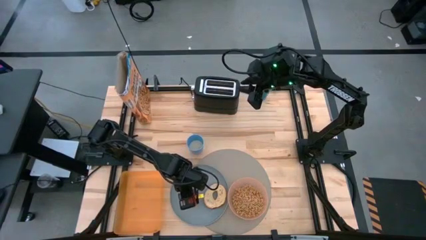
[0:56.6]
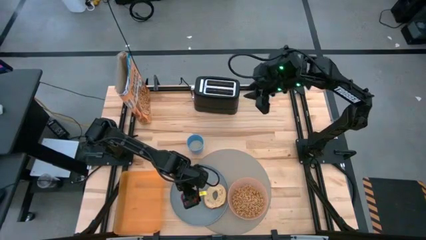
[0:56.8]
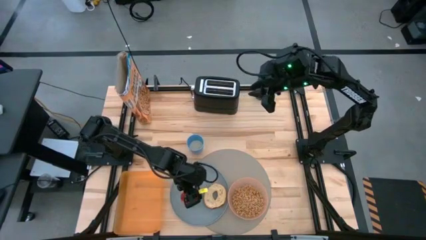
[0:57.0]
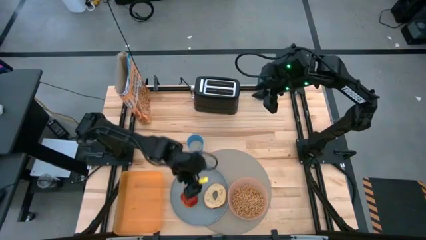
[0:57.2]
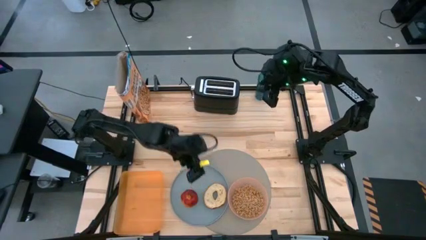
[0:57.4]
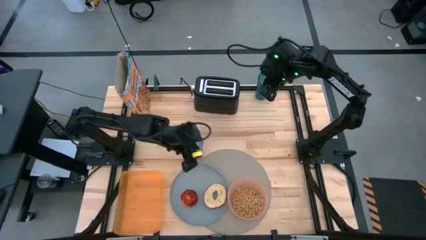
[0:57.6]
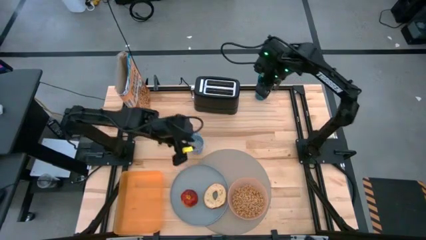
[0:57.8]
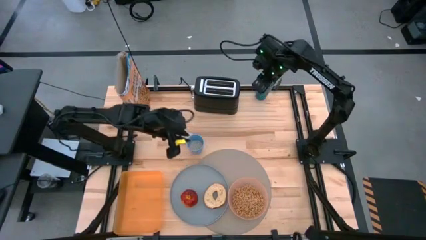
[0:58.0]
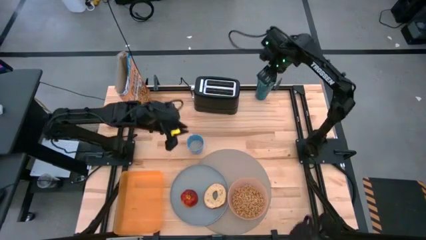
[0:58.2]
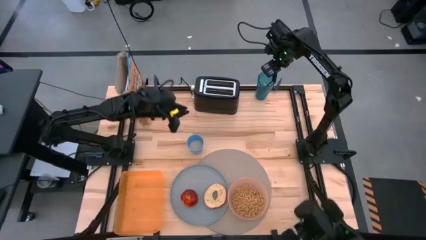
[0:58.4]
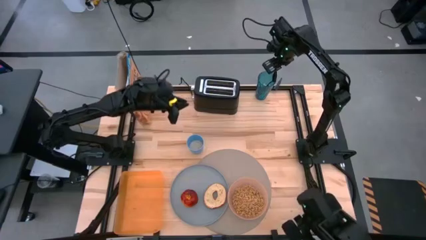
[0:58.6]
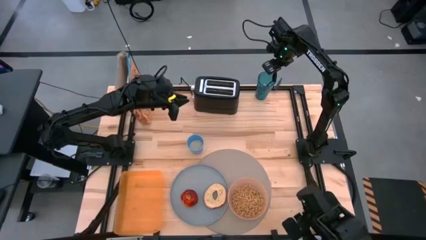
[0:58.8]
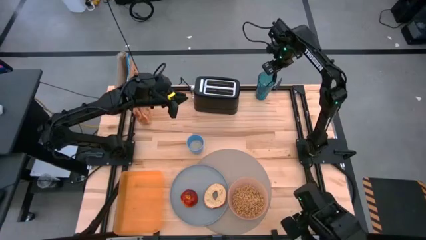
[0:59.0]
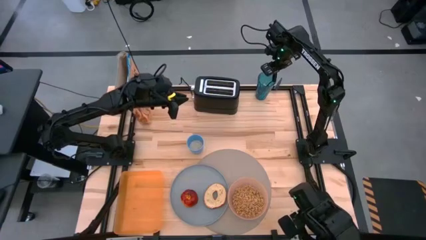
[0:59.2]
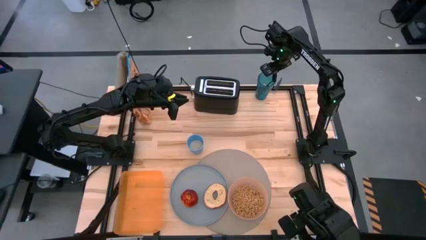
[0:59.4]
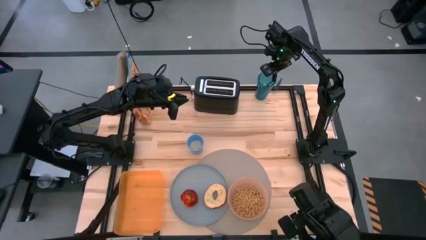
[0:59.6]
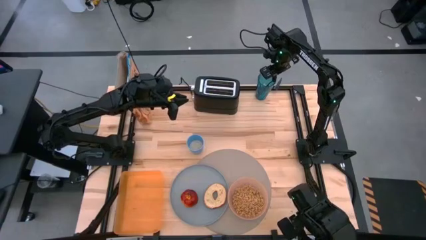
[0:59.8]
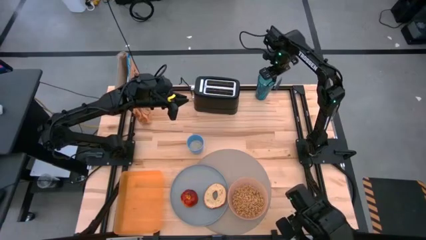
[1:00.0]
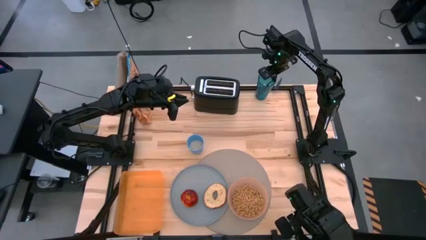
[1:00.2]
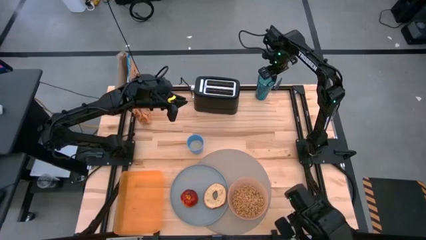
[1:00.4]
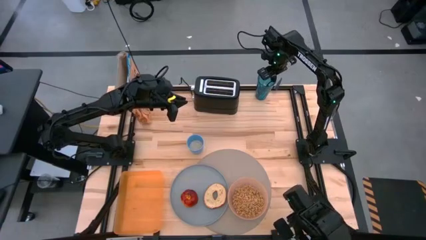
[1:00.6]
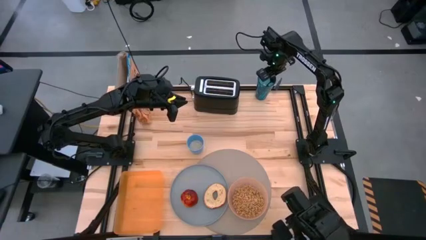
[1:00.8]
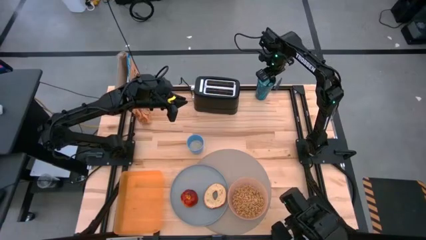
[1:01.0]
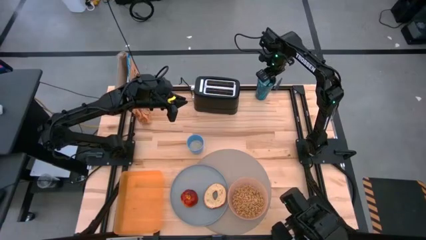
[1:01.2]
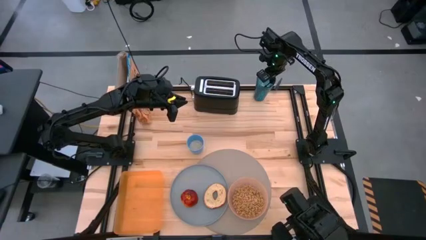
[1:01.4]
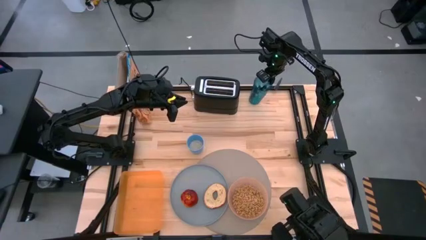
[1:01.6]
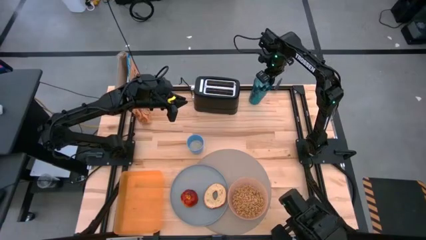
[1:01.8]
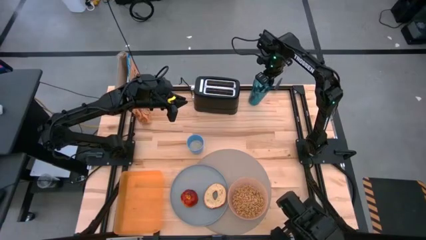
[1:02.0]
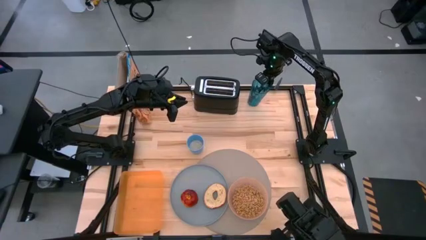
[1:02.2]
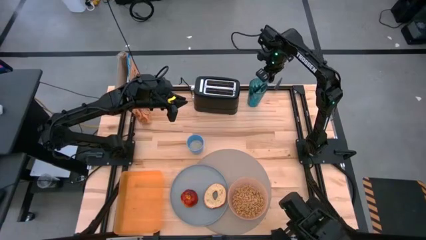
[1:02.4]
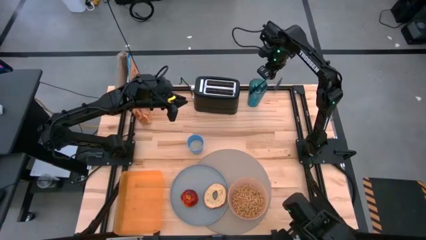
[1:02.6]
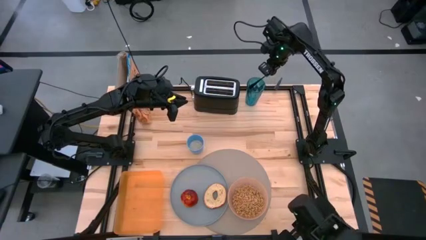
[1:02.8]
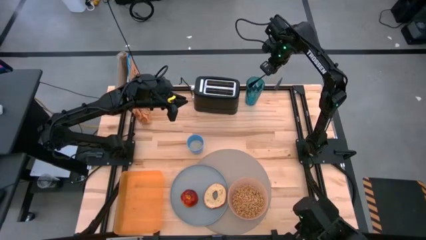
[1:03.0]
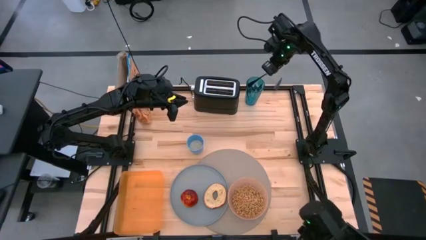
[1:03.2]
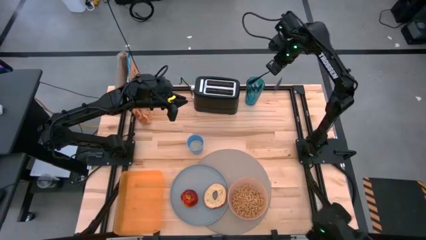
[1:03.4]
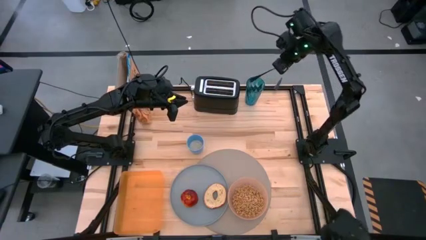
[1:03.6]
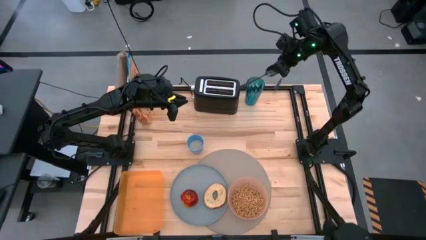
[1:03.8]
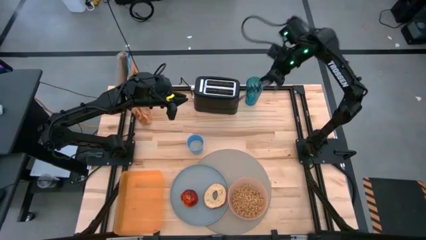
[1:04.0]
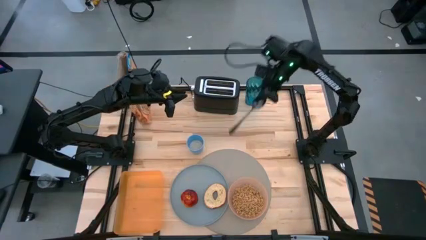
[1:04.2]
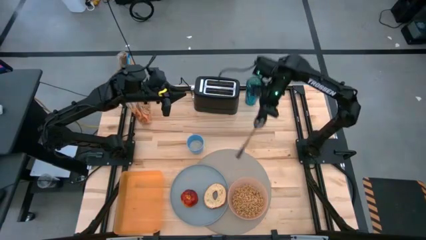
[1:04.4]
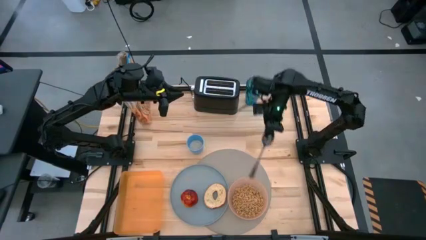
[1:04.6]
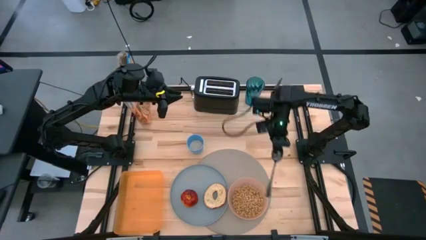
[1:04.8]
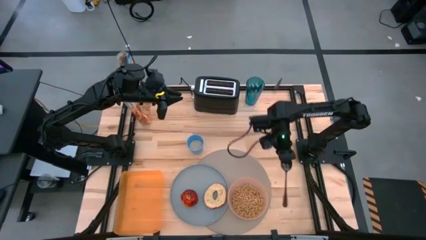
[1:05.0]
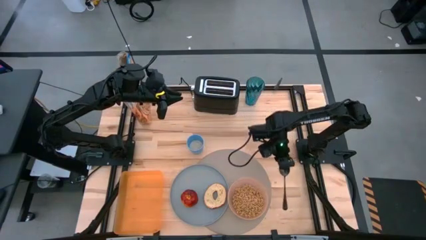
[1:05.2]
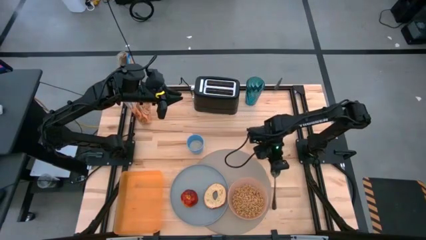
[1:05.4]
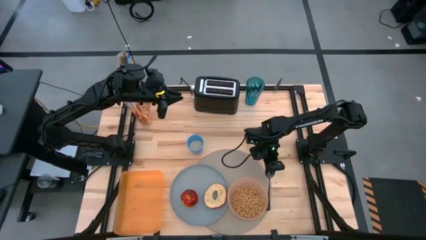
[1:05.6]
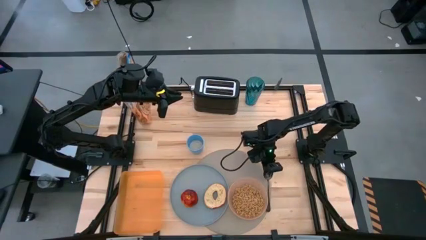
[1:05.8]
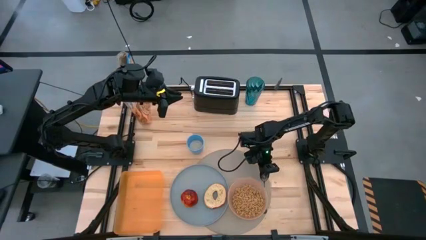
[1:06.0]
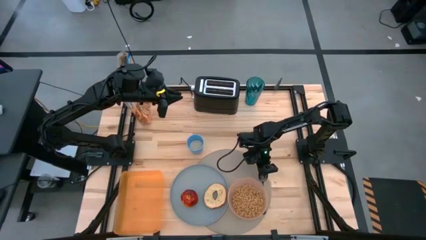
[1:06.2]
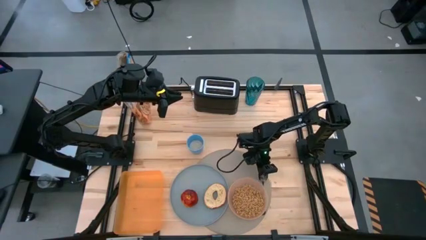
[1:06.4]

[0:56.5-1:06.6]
Task: Arrange a breakfast setting
Put the black spoon from the blue cup on the brown placemat to the right of the orange bowl
